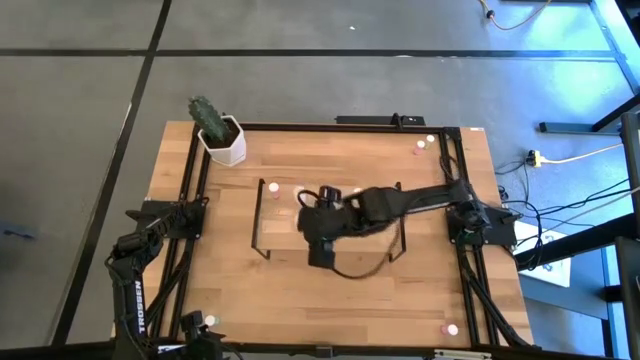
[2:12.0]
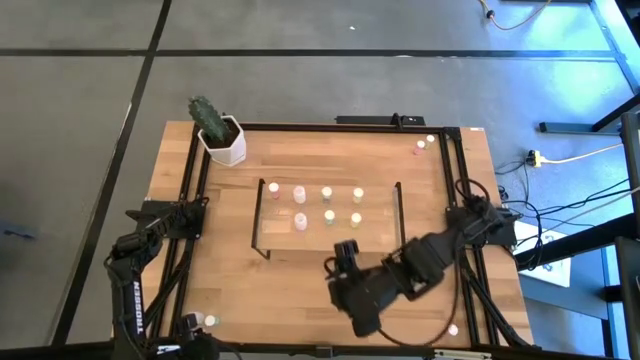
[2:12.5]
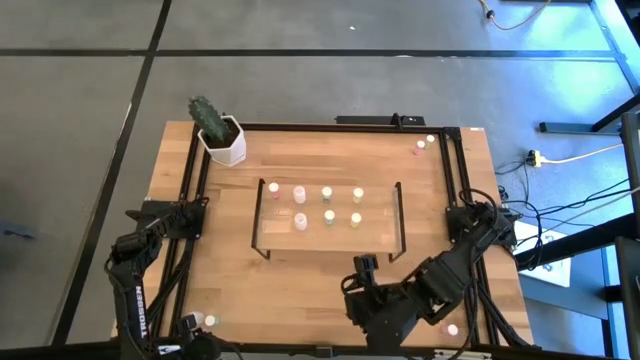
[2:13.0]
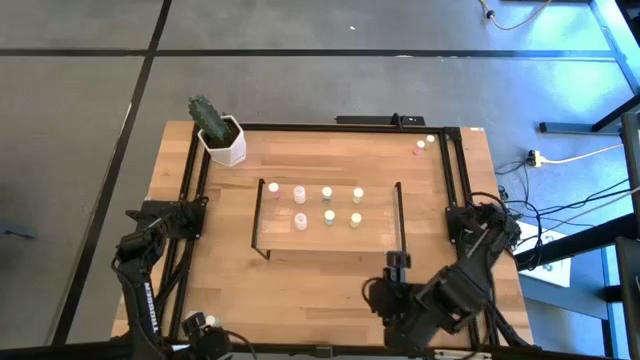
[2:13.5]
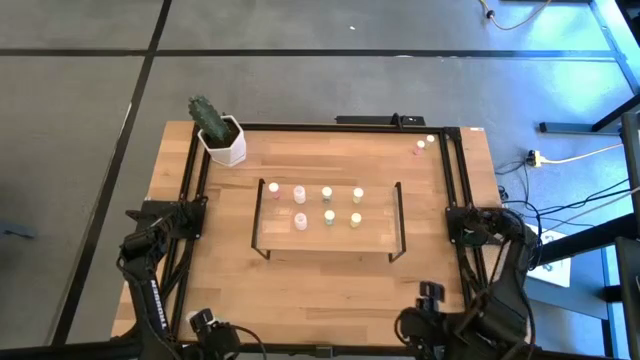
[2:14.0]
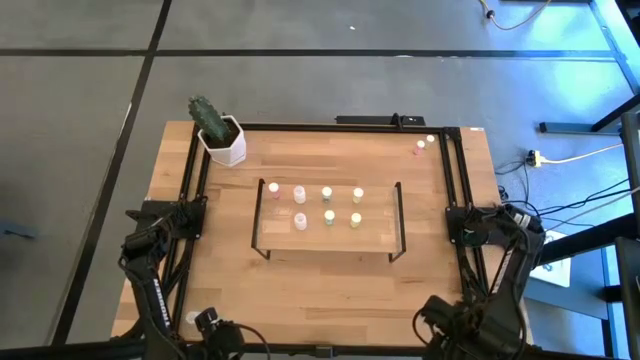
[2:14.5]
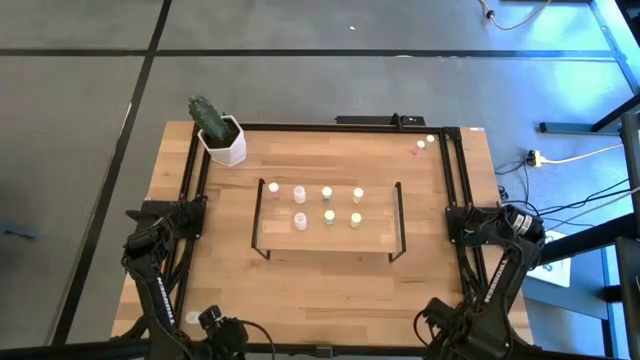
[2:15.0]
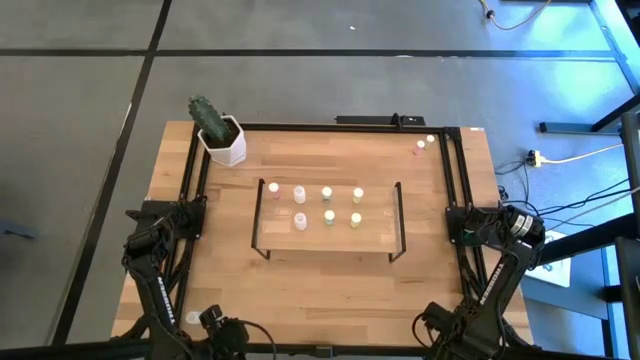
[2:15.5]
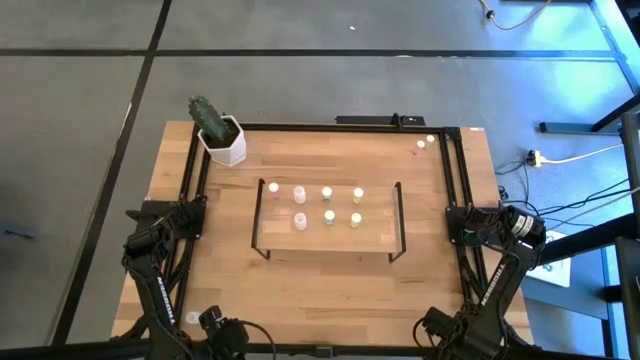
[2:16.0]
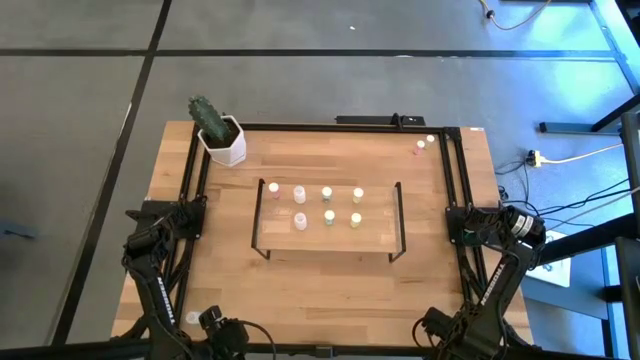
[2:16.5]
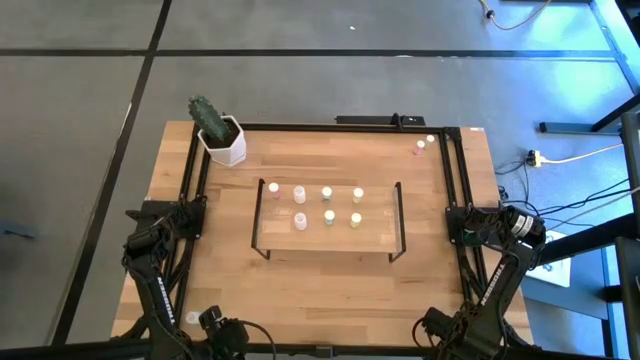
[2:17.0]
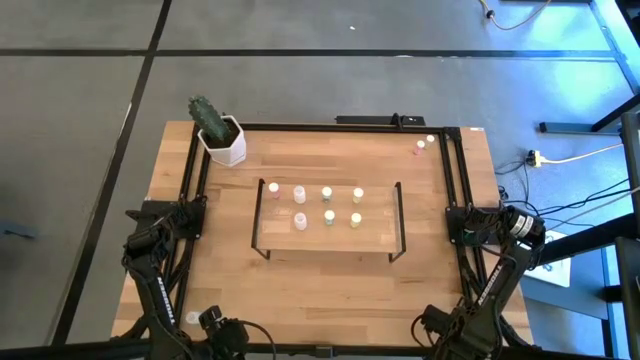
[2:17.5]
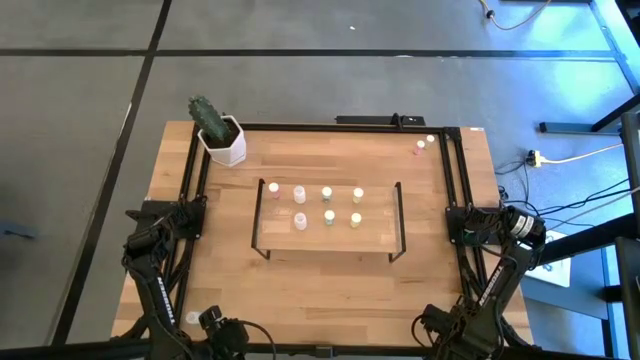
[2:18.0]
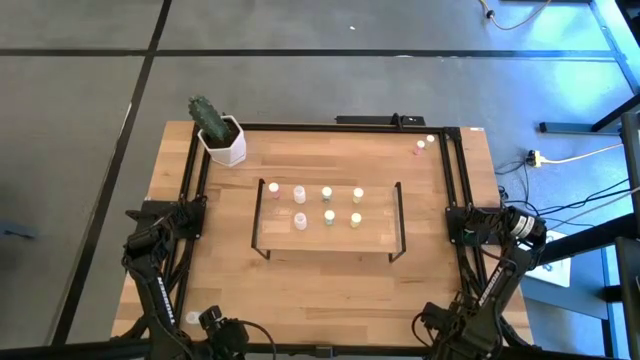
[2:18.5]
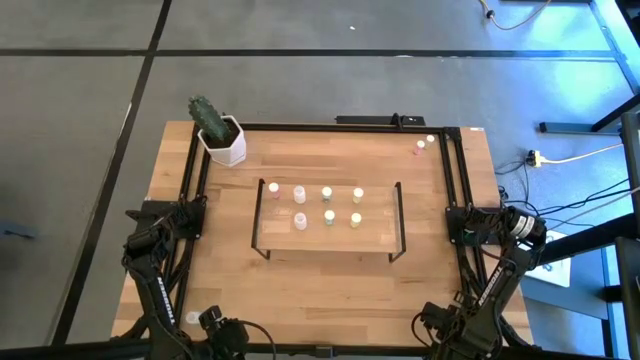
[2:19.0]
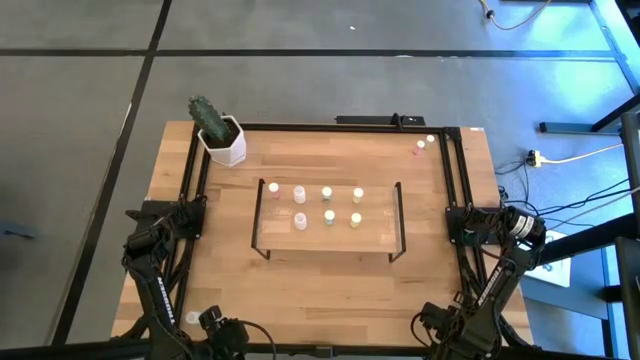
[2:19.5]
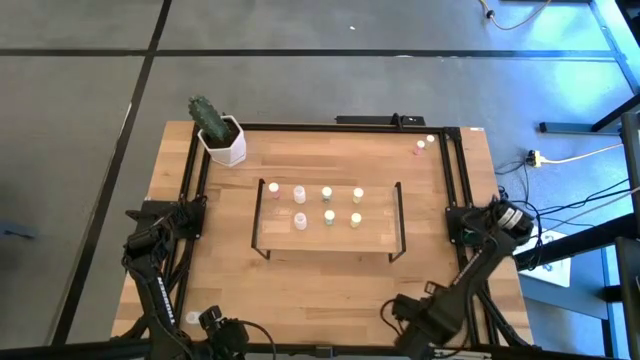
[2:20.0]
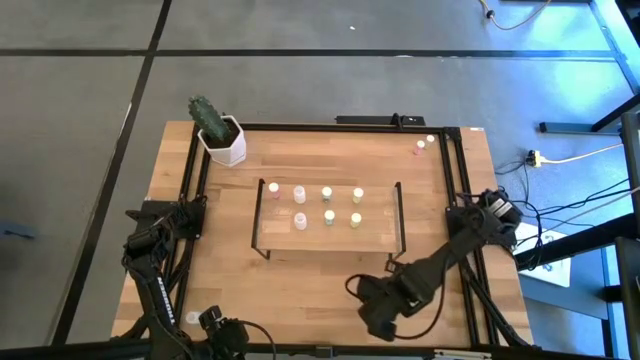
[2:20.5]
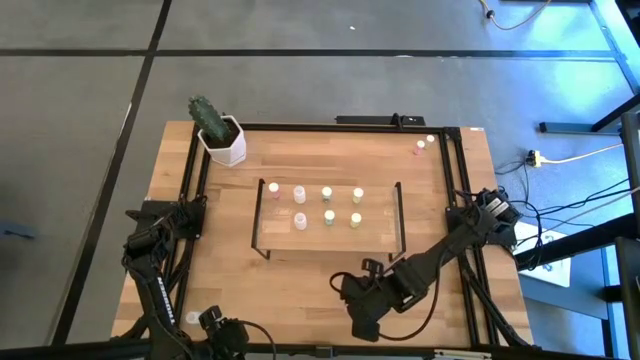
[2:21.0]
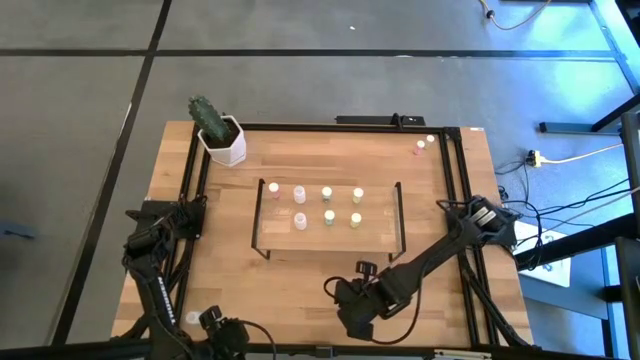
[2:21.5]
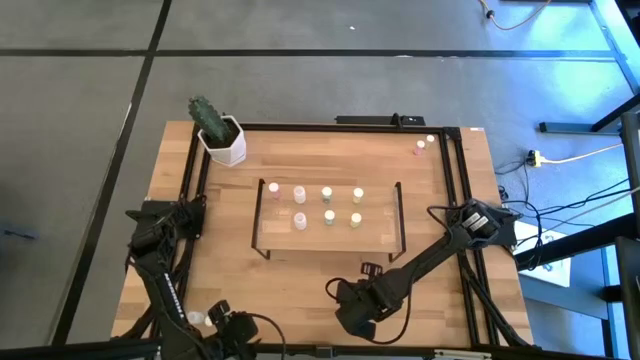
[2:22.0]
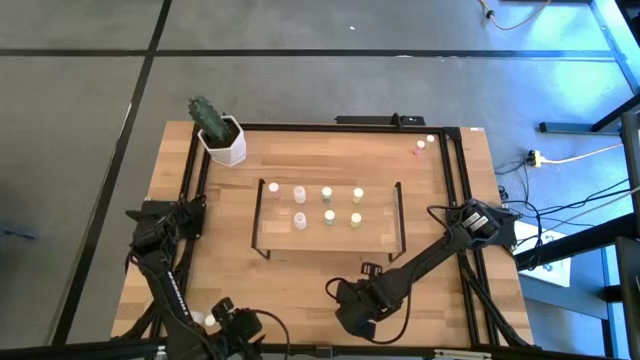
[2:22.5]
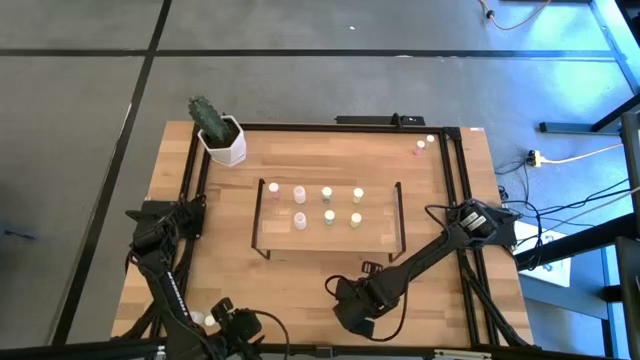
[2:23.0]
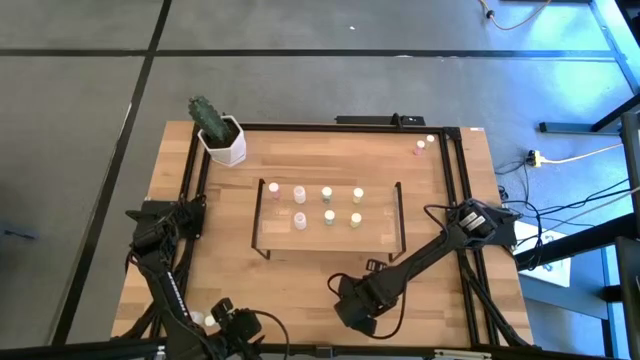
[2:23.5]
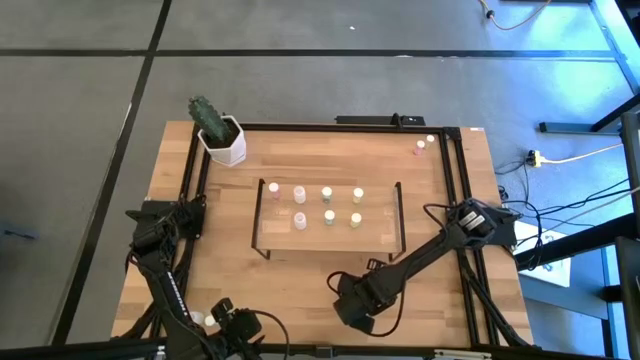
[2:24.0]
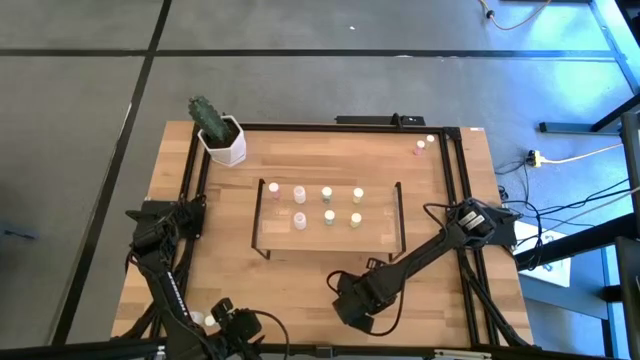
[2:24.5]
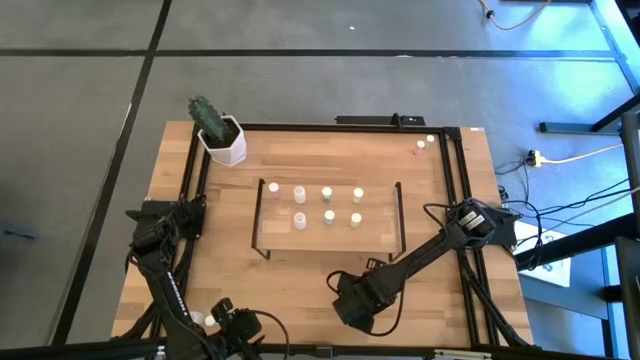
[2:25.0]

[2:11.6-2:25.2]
Task: Pick and place medicine bottles onto shelf by color
Put the bottom pink pill bottle on the shelf aligned with the other pink pill bottle

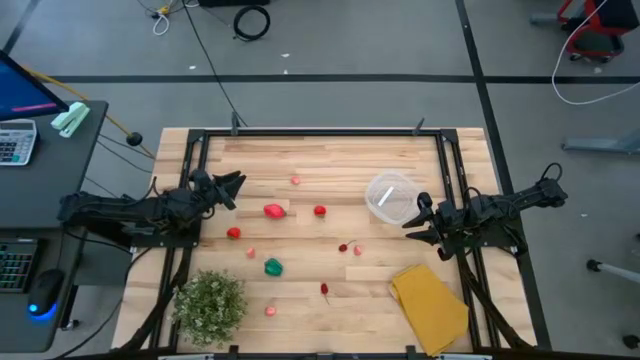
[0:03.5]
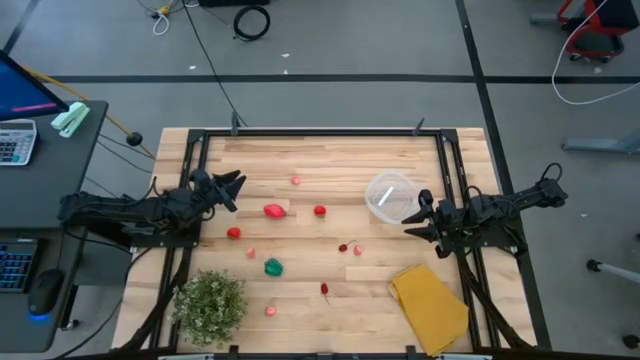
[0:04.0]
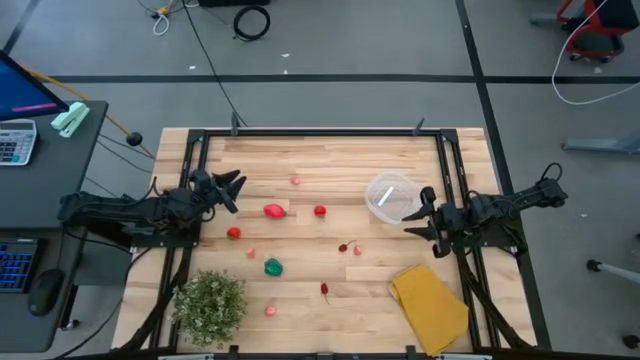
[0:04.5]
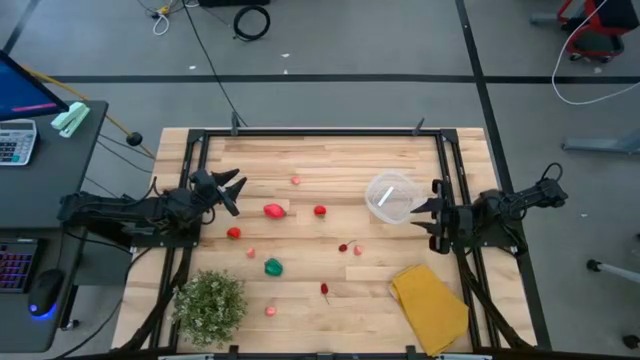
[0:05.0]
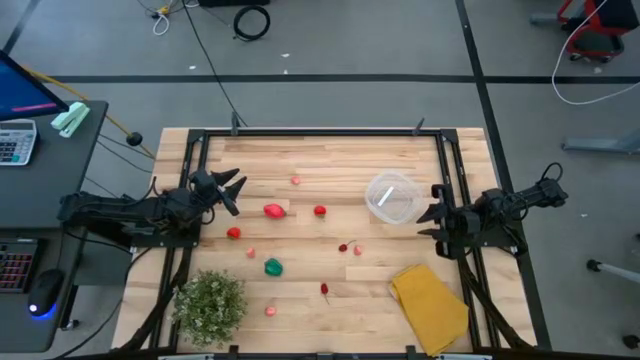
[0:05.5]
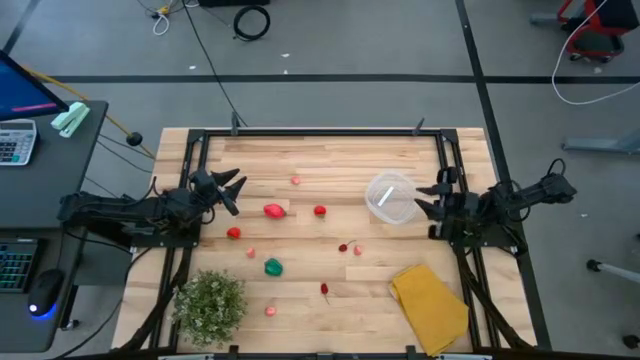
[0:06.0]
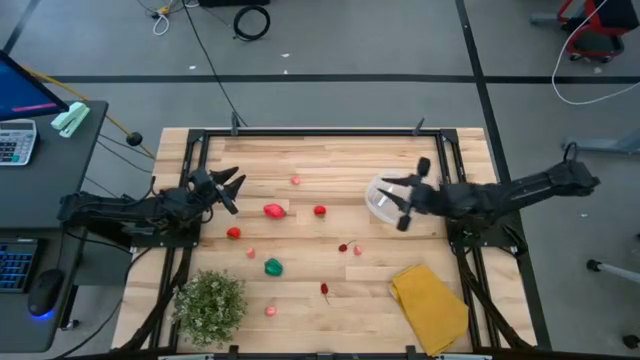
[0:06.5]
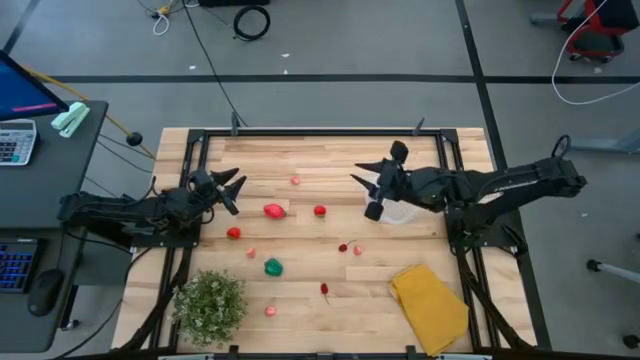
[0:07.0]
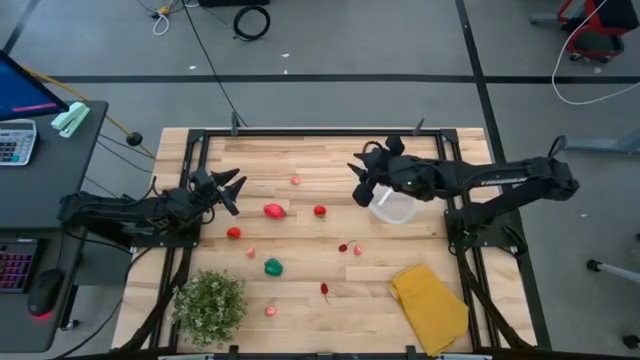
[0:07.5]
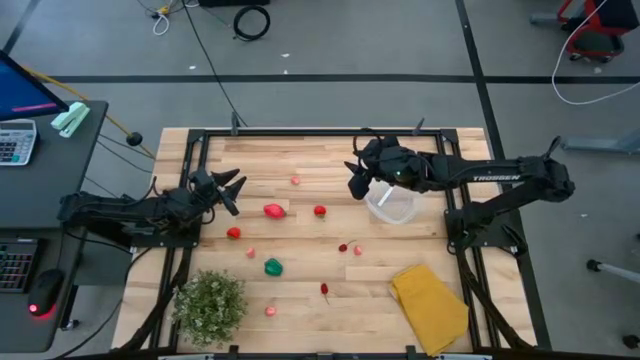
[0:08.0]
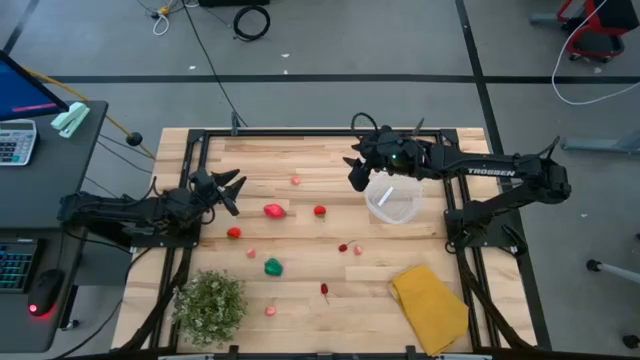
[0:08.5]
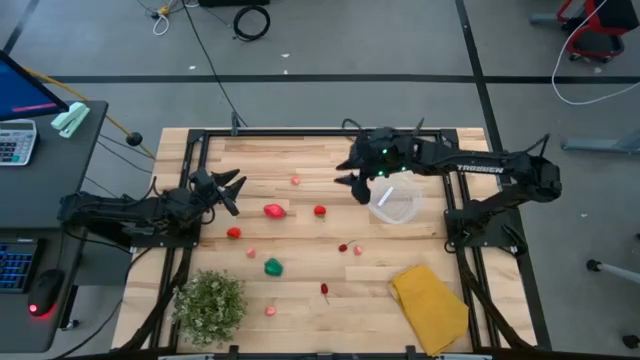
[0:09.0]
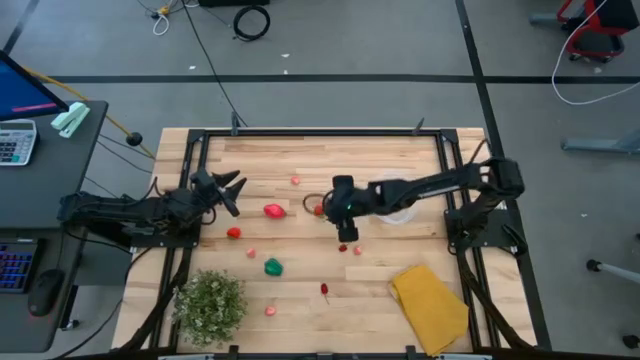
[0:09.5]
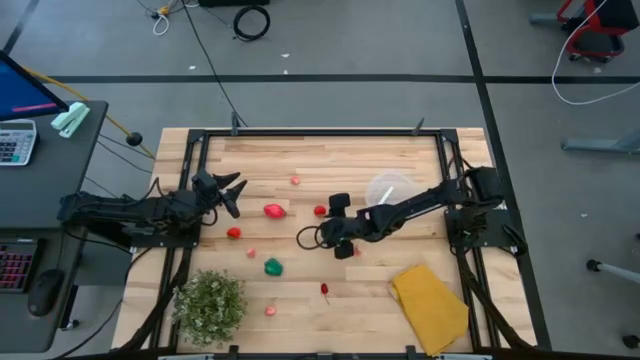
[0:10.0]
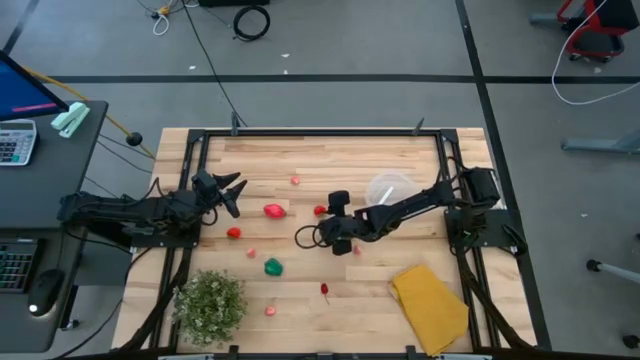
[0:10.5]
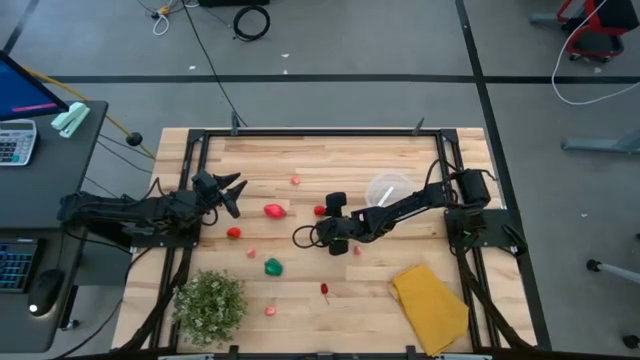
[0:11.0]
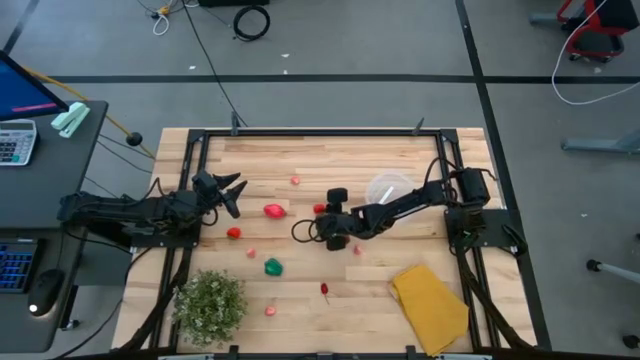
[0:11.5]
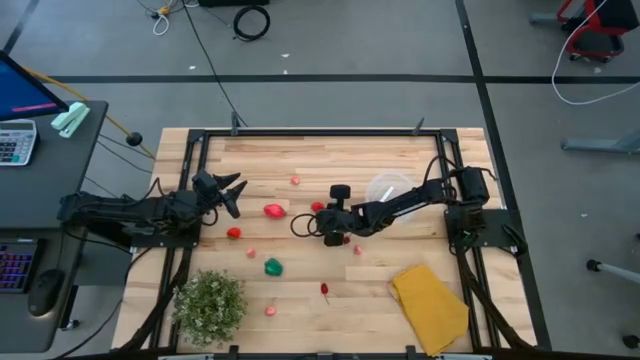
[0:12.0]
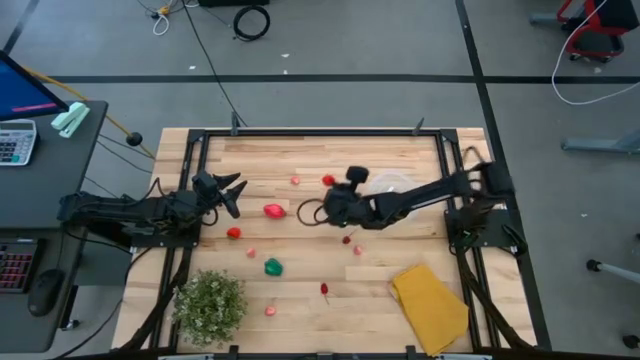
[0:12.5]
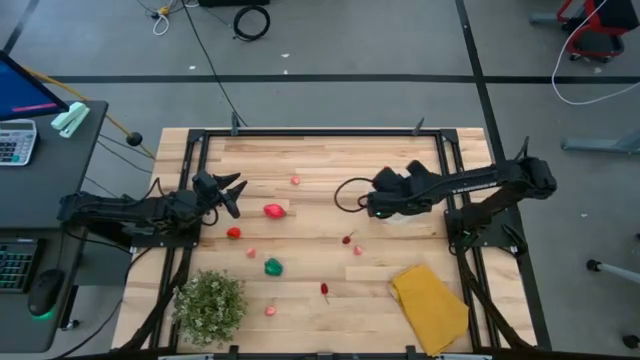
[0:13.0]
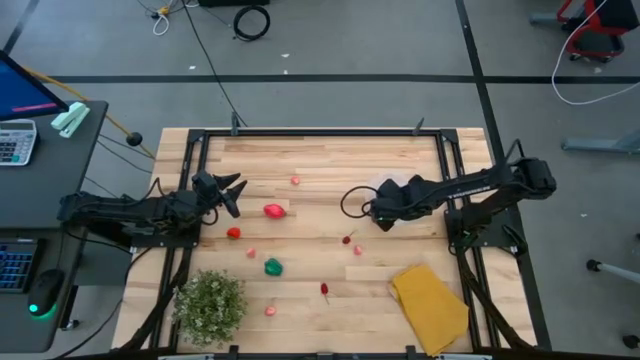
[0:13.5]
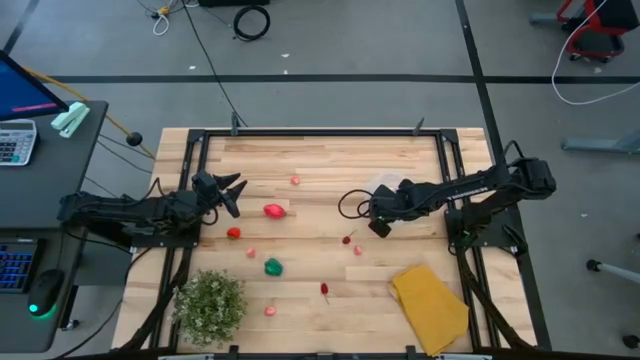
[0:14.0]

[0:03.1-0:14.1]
Task: Pick and placing Produce into tupperware
Put the red strawberry into the transparent container
